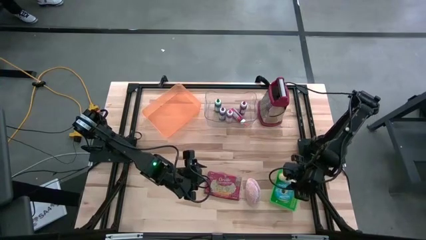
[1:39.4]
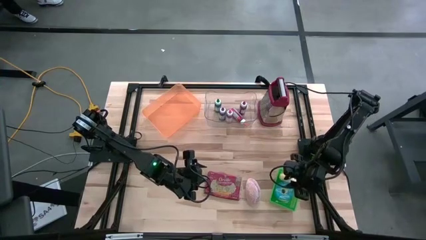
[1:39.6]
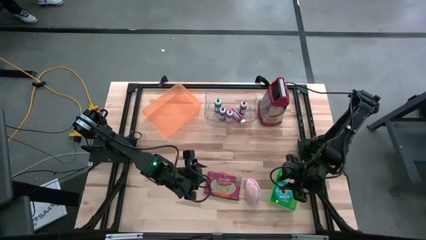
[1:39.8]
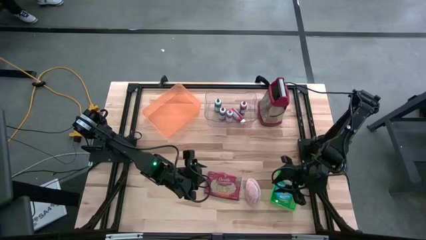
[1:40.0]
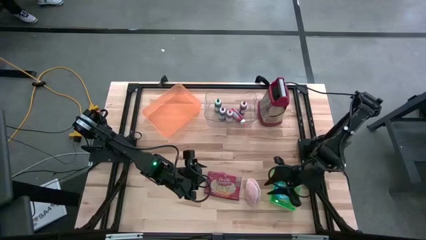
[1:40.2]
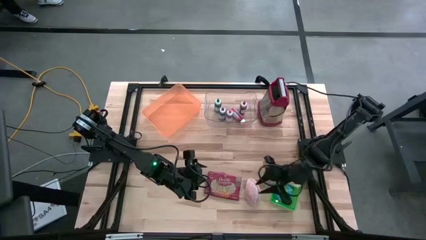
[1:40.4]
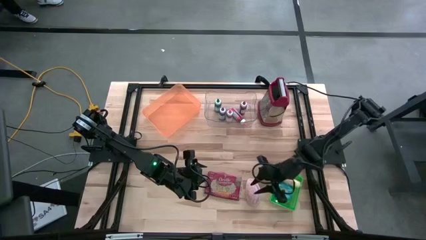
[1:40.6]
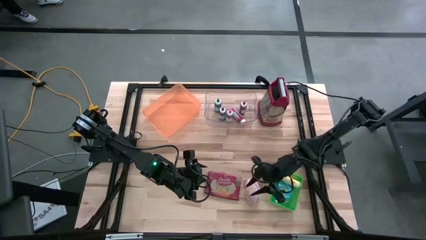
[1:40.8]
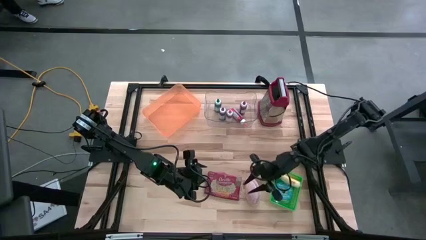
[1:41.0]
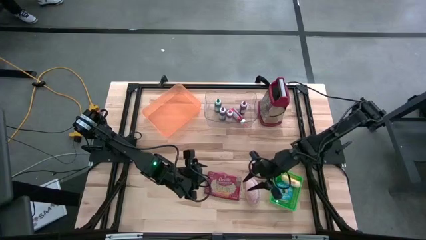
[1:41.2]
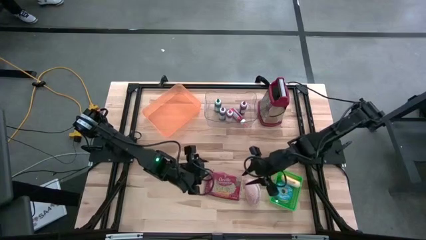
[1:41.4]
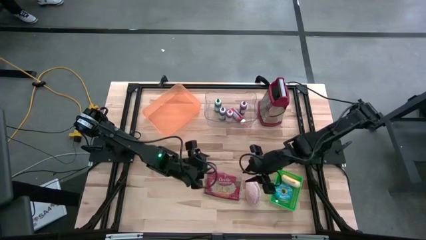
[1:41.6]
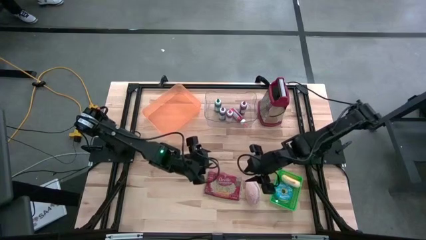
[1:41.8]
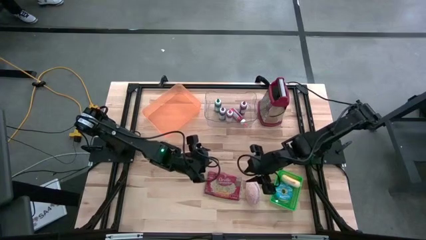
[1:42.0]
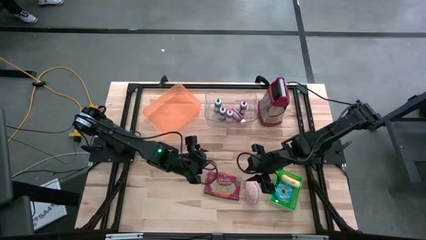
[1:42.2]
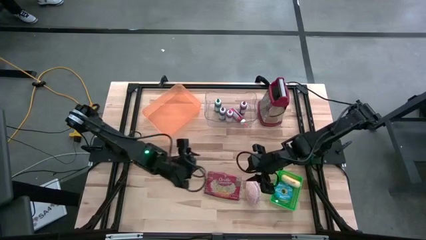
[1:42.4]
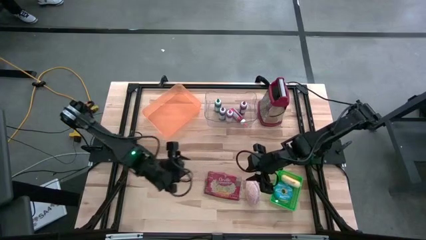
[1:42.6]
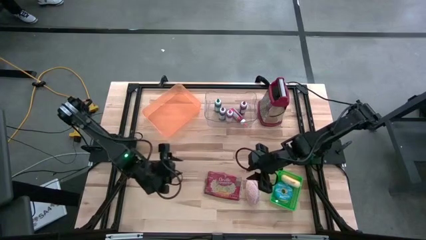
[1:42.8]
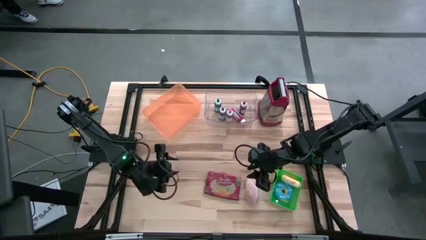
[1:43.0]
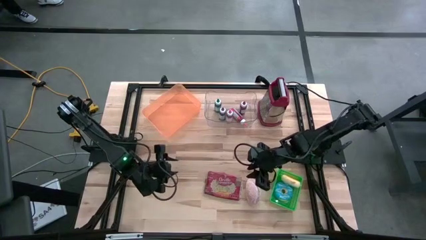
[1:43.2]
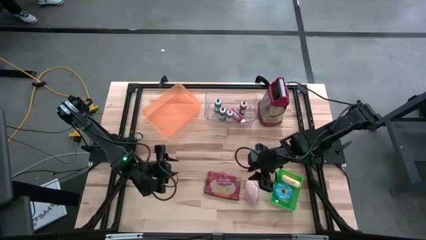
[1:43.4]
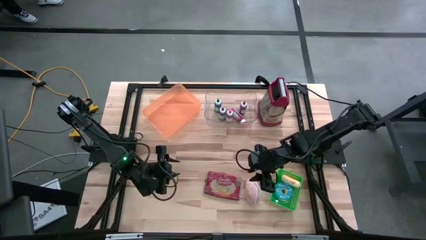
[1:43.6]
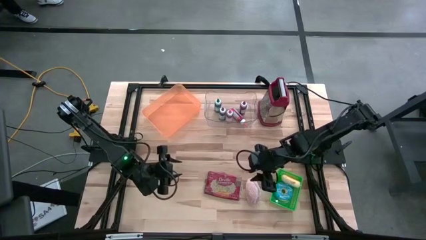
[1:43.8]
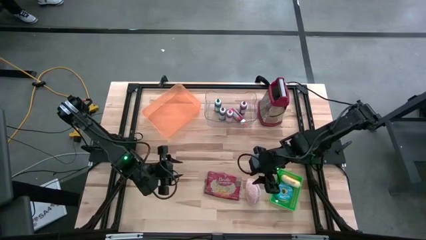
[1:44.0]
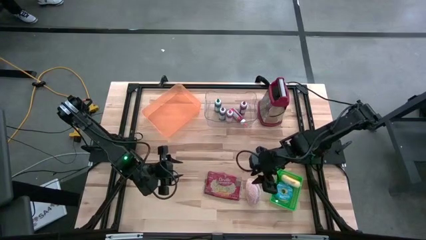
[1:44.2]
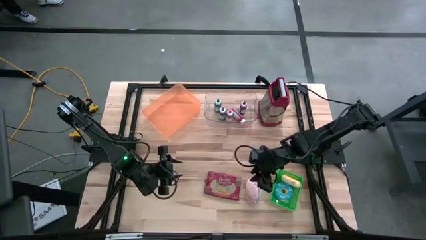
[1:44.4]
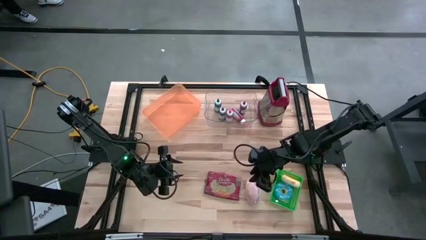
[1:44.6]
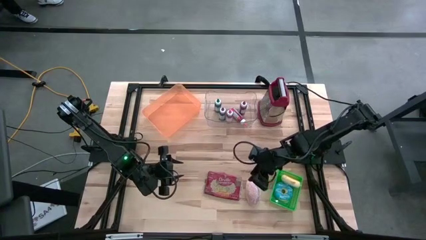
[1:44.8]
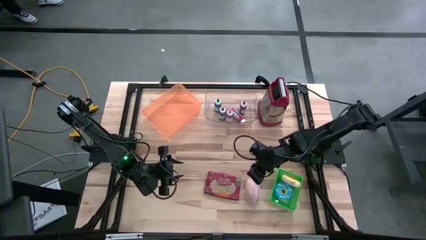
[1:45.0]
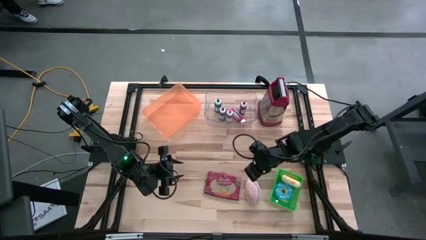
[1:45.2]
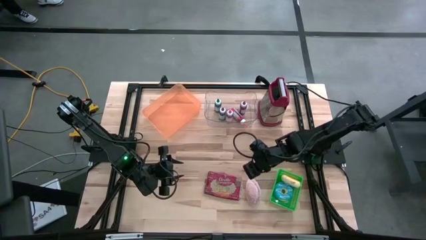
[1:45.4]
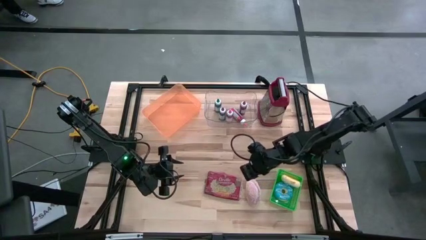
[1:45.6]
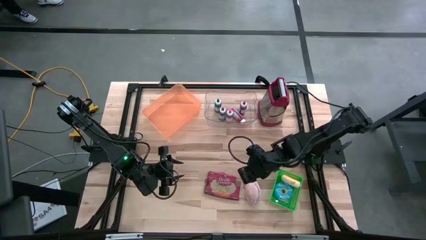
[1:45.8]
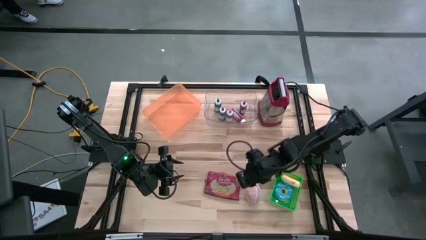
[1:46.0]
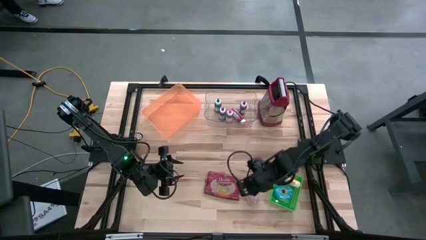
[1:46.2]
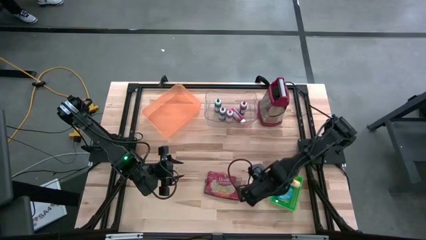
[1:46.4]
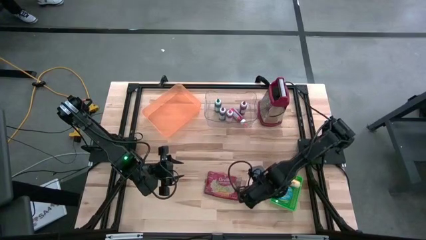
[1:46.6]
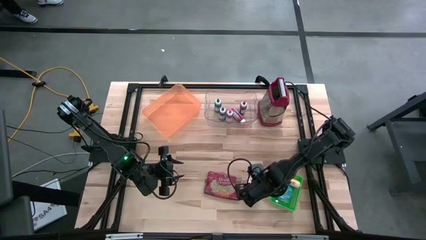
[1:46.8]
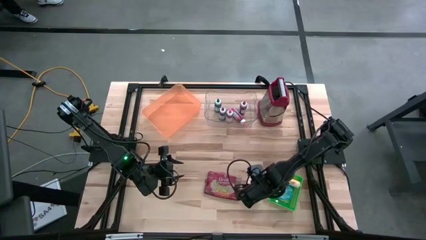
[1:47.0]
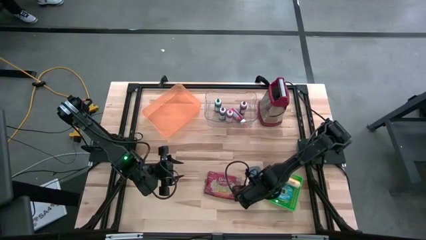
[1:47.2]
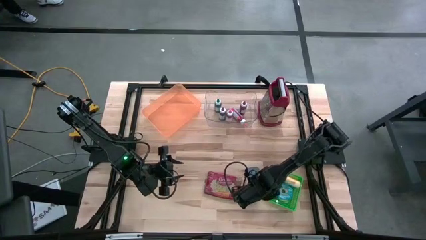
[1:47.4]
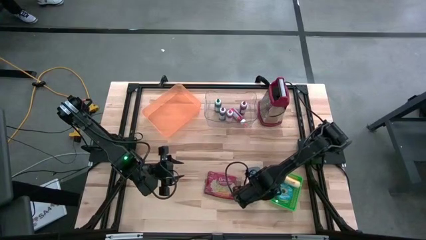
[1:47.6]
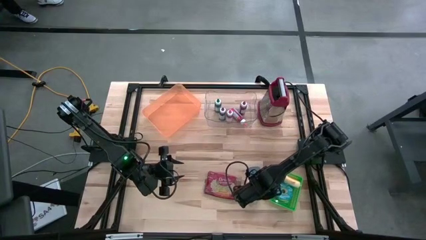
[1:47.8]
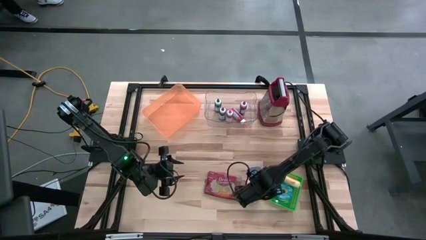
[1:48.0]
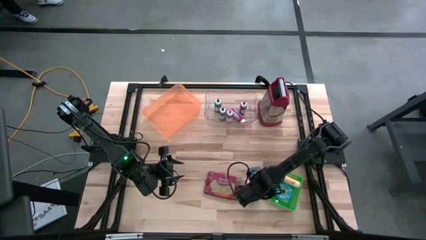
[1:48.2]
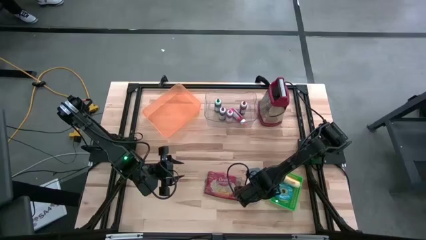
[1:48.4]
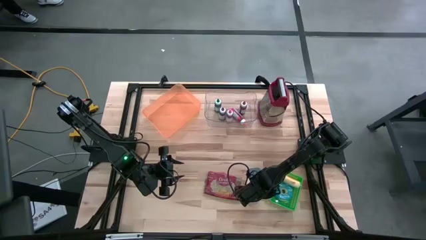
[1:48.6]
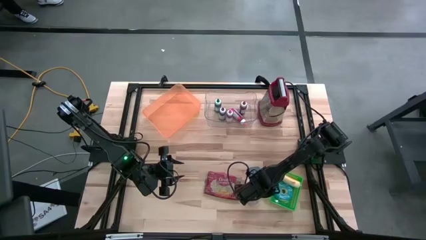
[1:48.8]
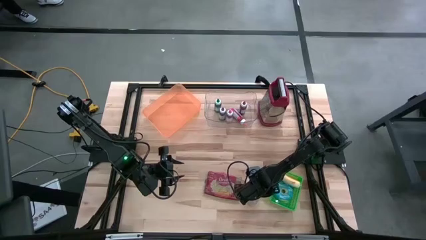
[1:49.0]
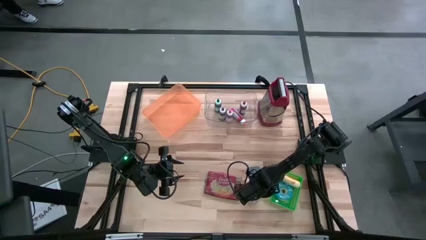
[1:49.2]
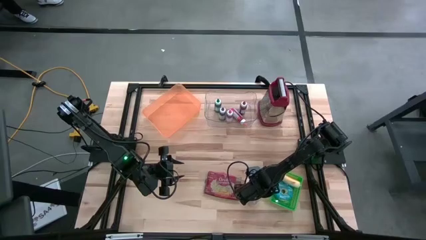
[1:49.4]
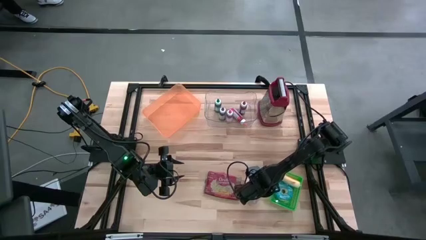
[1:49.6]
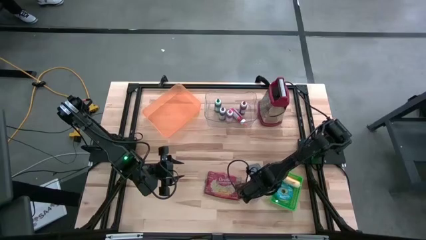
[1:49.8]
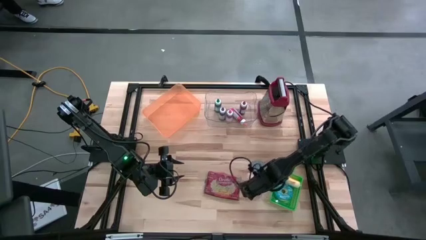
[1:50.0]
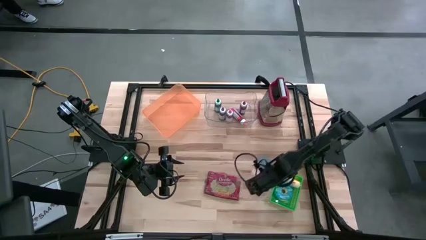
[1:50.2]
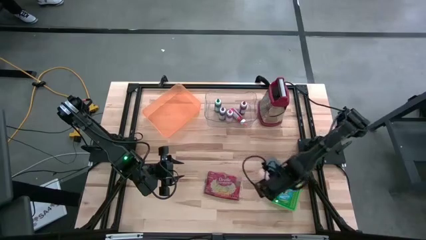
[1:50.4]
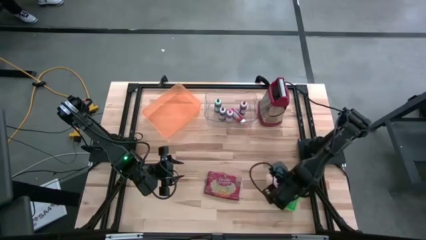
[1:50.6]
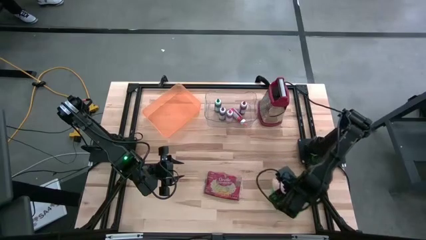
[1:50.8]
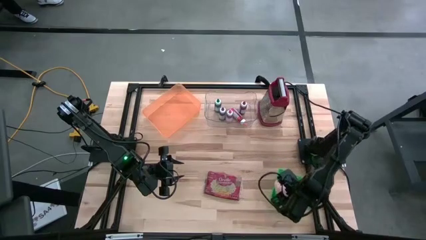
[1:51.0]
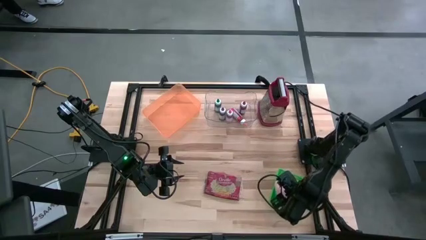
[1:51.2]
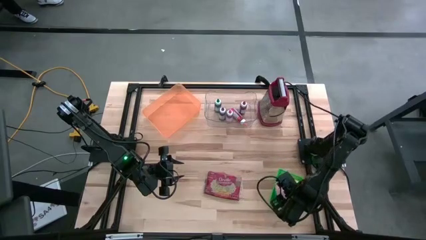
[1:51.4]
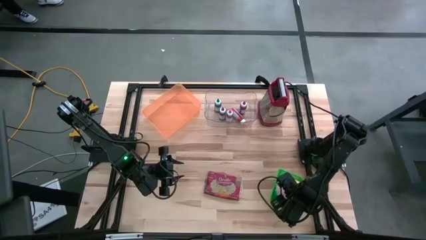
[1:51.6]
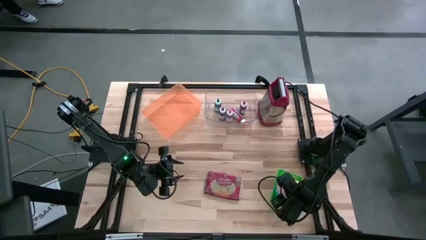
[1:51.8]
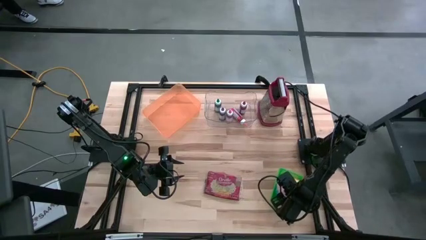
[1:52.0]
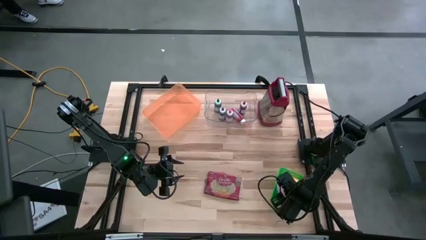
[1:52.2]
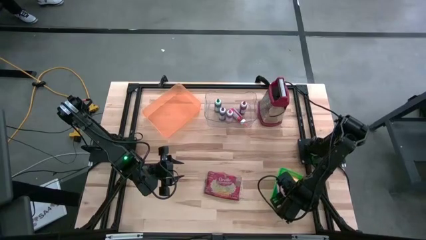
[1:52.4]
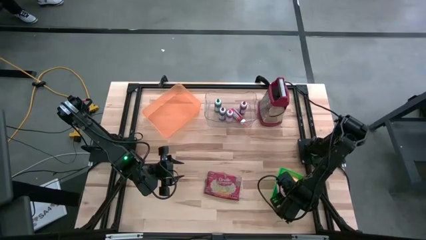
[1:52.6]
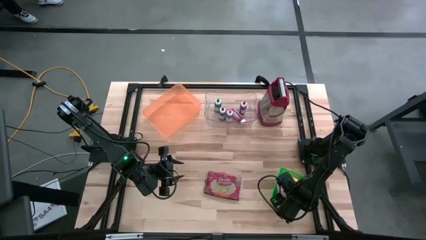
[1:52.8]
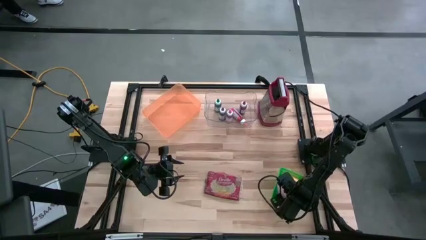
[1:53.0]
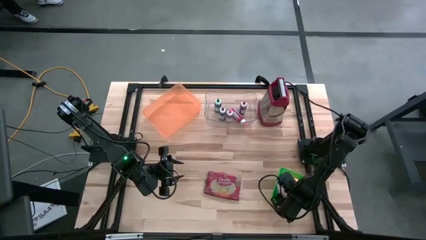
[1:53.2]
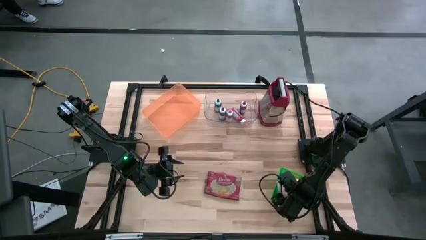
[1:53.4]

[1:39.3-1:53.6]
Put the pink donut into the green bin
